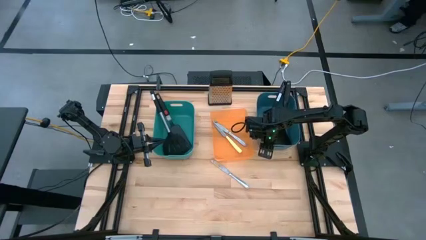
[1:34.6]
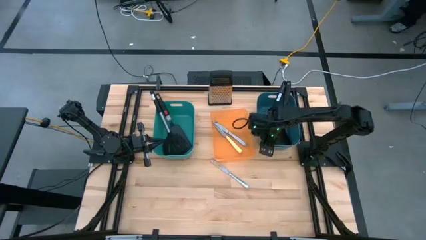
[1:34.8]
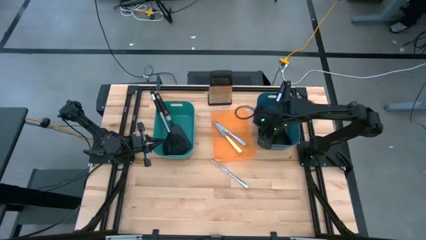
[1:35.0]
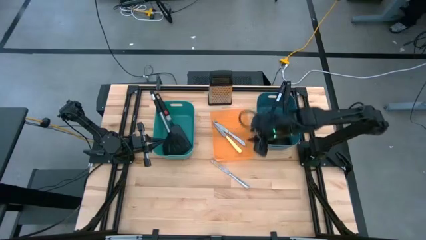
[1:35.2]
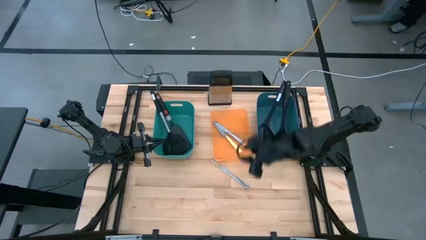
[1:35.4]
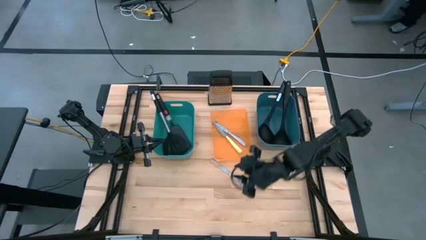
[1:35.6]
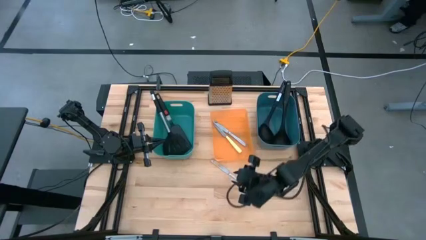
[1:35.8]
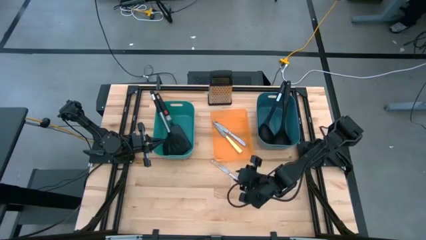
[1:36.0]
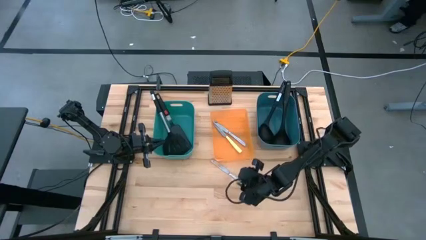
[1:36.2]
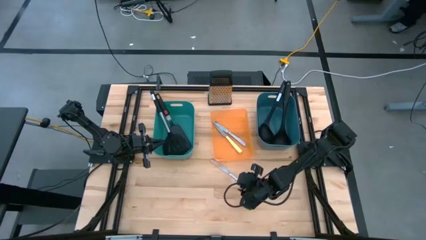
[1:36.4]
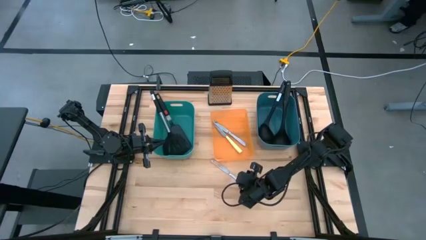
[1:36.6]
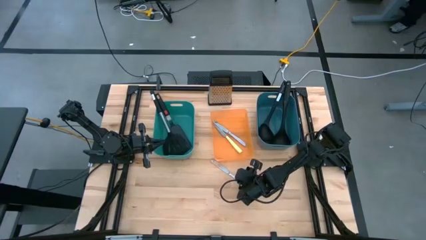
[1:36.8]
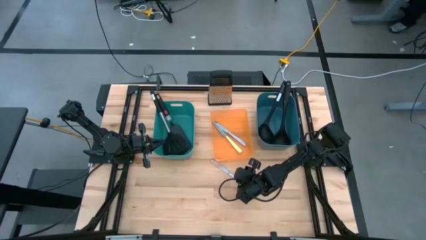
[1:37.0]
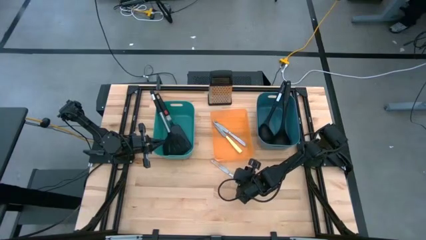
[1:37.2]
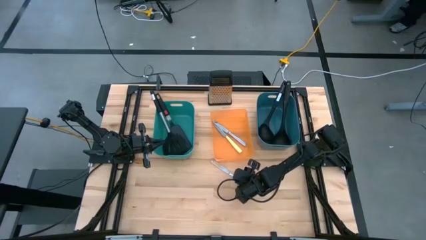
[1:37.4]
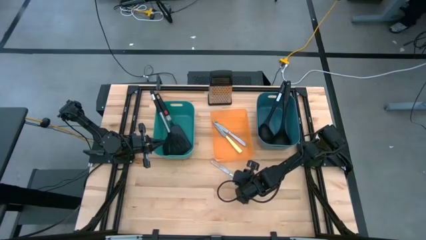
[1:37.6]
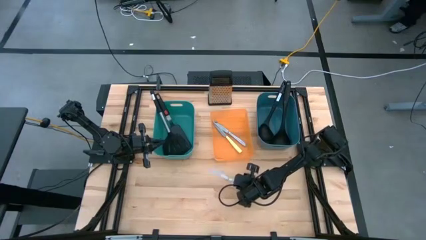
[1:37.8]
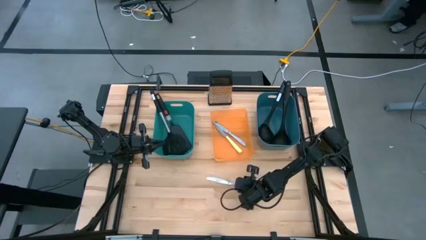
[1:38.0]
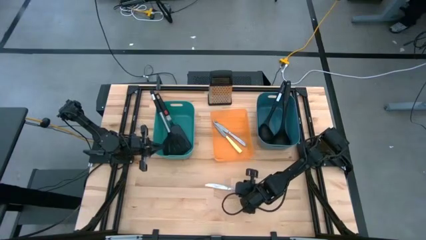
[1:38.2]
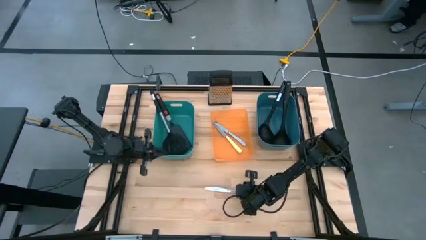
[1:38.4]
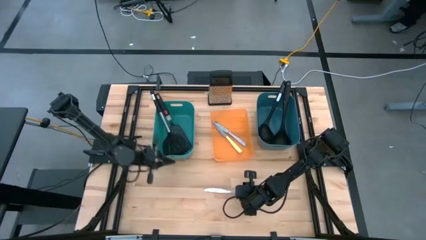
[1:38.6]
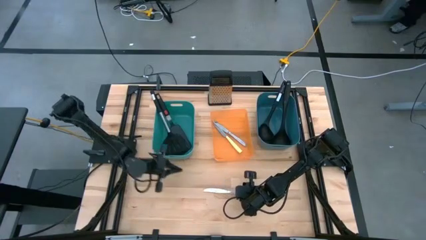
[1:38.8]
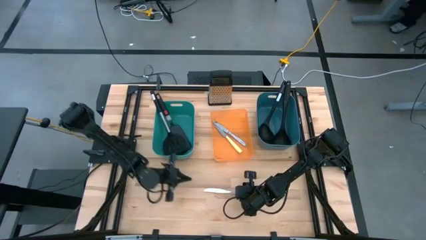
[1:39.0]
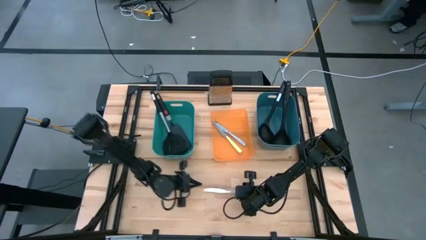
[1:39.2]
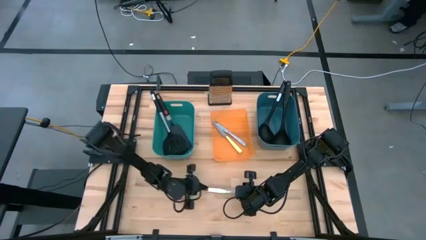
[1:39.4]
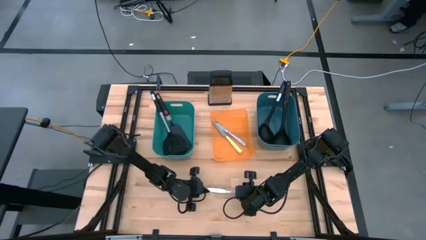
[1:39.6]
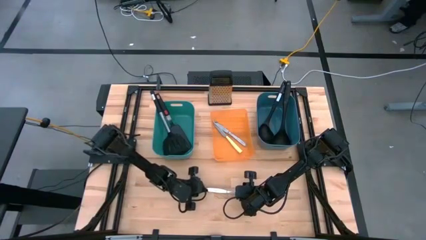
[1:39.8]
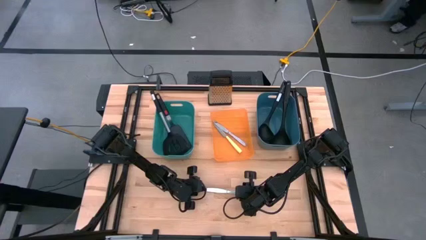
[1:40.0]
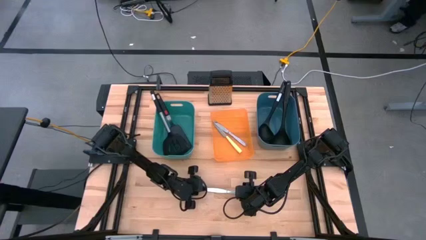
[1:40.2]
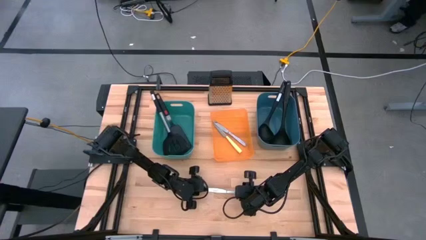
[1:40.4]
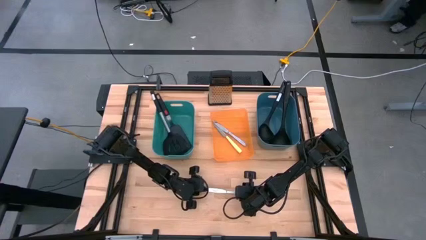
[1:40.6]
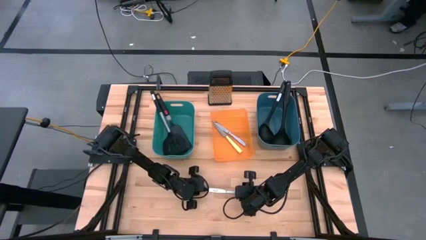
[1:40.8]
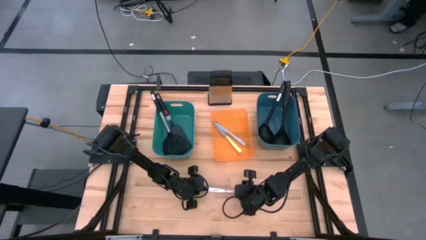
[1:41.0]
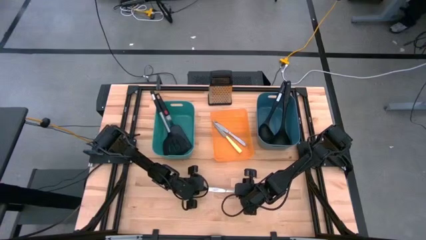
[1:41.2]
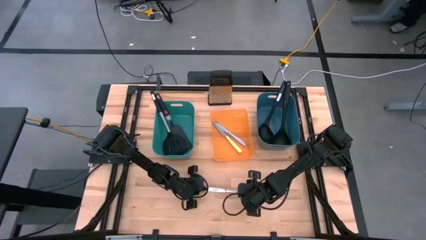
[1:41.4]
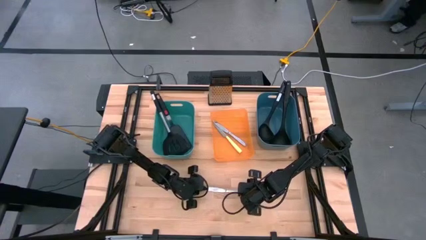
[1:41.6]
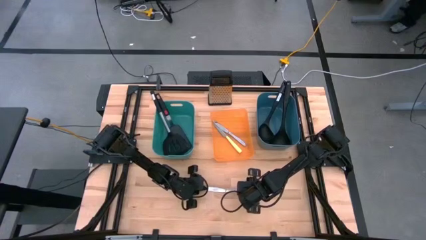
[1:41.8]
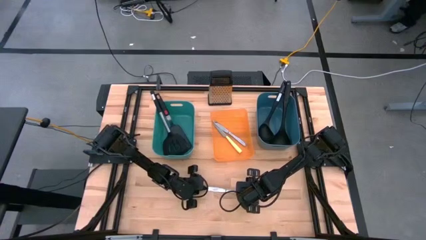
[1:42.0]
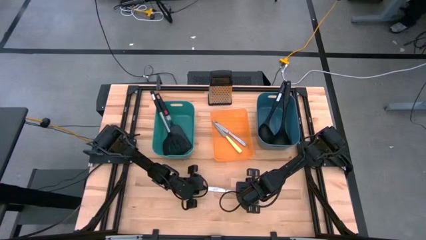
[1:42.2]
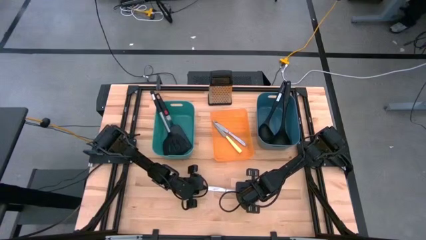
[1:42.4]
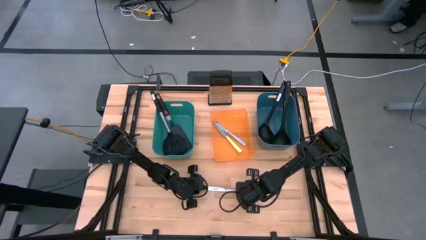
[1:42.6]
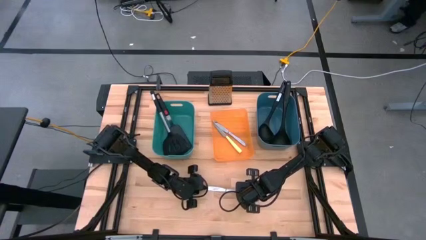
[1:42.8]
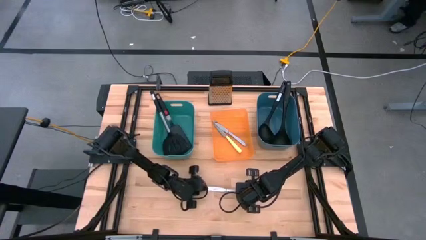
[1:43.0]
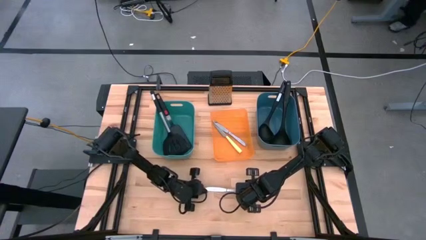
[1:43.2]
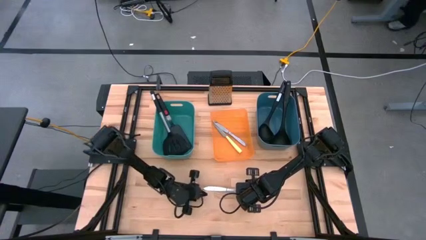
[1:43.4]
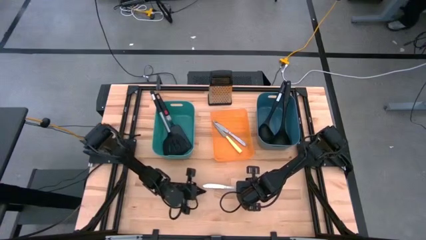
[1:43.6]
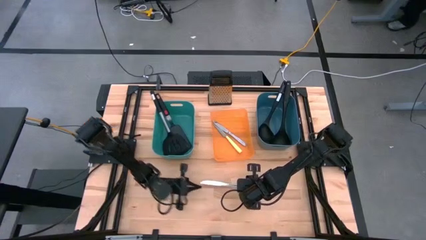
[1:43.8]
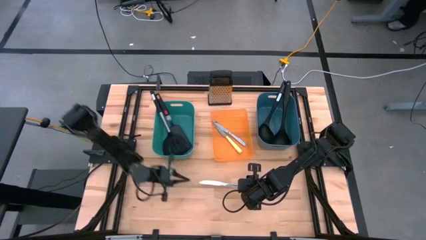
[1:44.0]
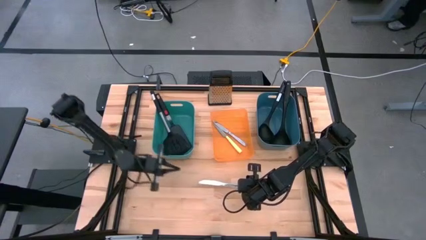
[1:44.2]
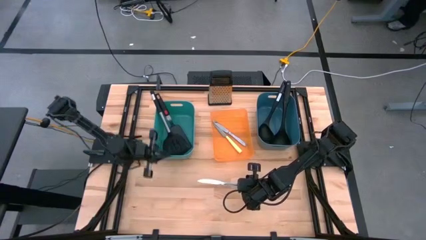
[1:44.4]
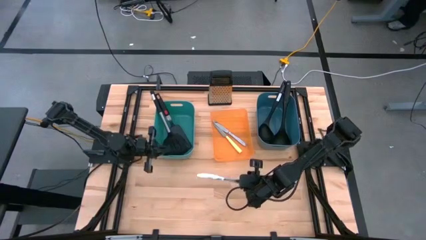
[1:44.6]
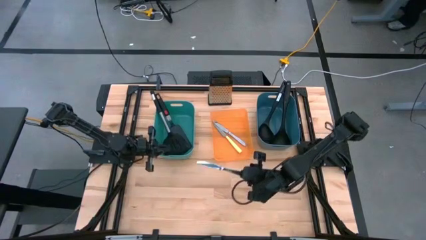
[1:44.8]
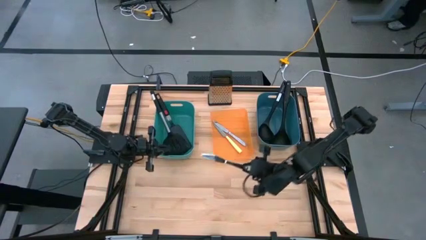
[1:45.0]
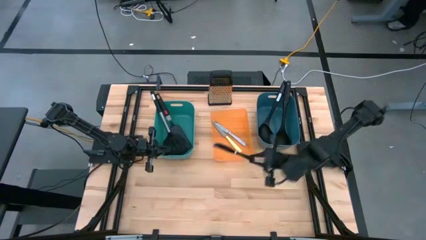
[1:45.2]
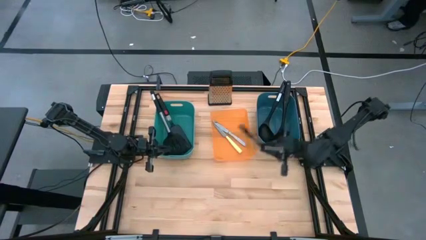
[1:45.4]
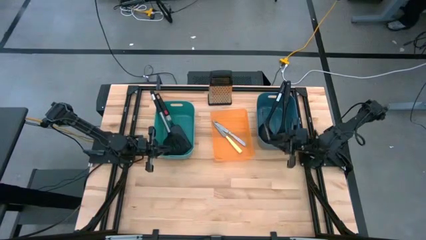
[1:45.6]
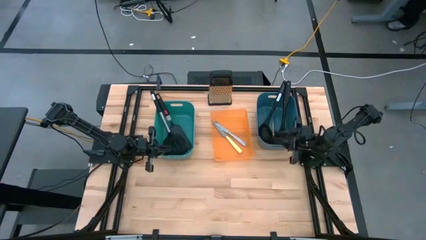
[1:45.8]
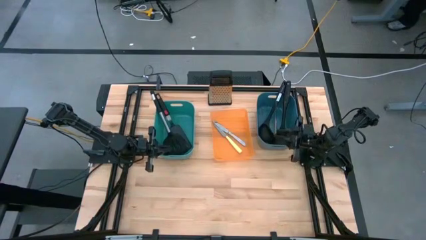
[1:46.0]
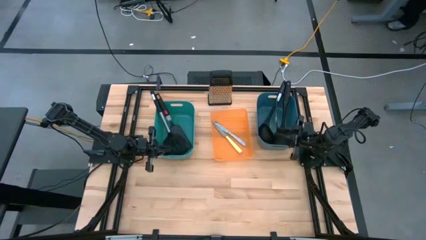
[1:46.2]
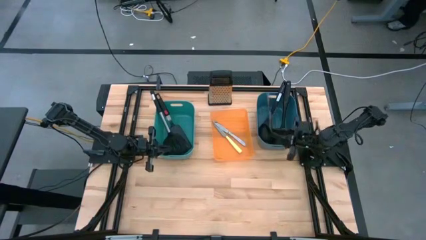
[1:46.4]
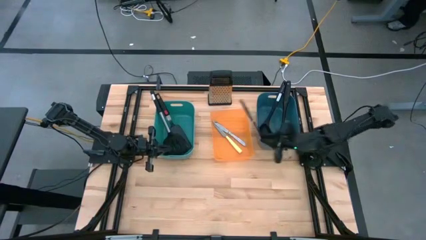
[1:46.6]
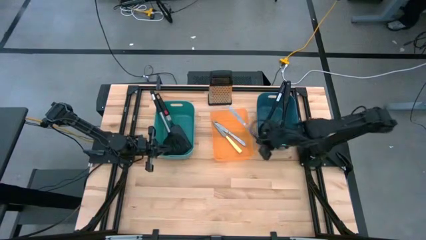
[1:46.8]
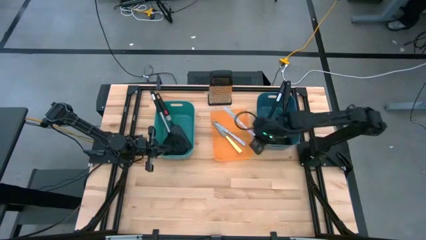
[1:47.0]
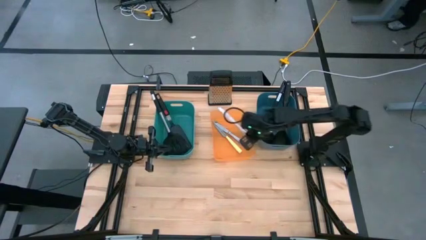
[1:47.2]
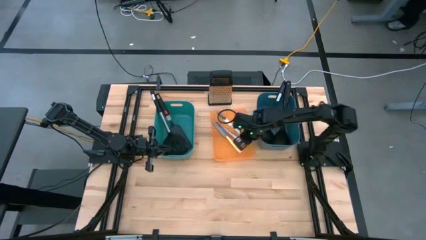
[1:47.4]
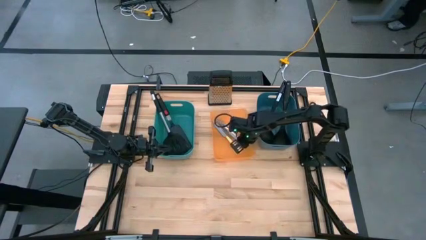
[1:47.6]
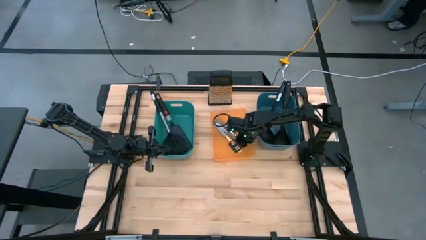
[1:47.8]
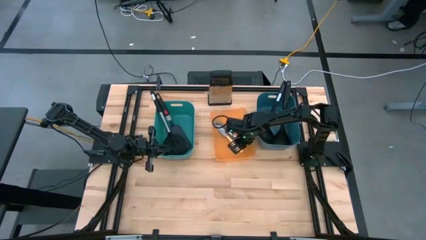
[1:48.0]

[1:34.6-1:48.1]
Task: Pick & Place Kitchen Items
Put the silver knife into the orange bin

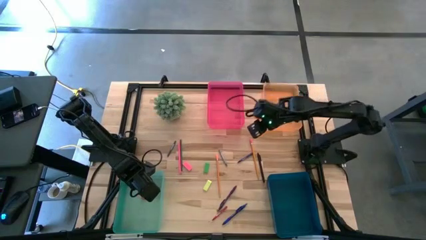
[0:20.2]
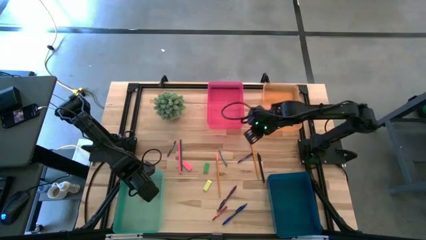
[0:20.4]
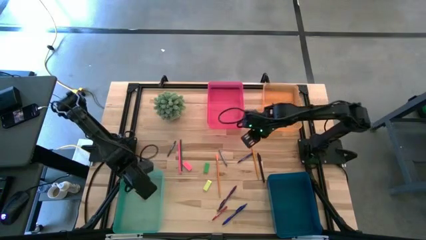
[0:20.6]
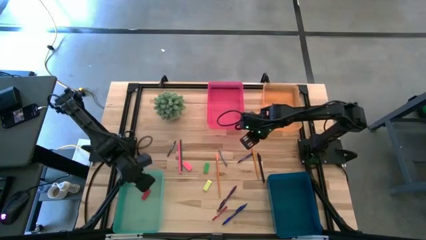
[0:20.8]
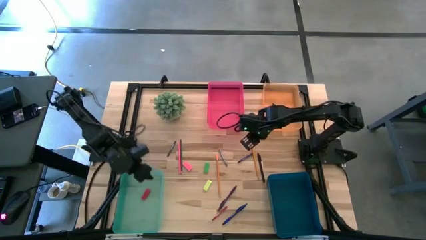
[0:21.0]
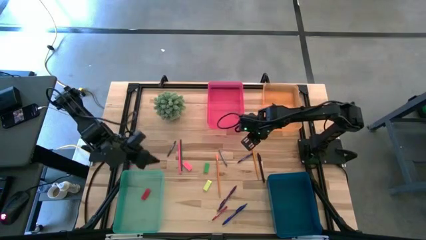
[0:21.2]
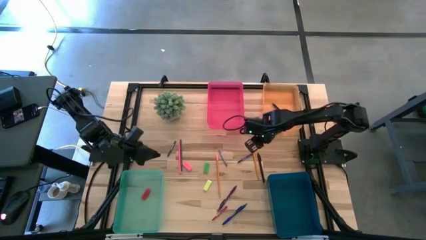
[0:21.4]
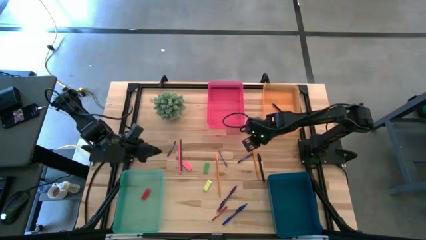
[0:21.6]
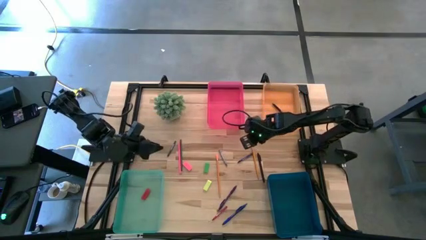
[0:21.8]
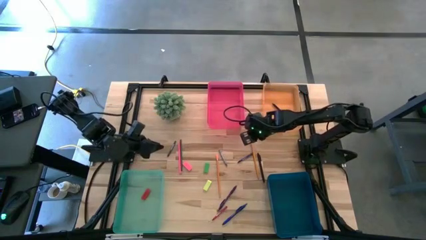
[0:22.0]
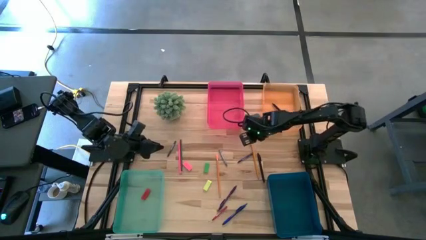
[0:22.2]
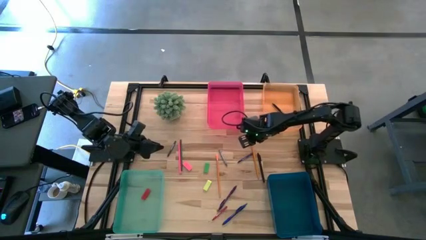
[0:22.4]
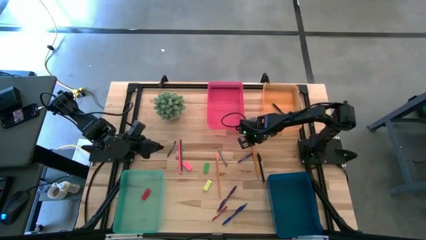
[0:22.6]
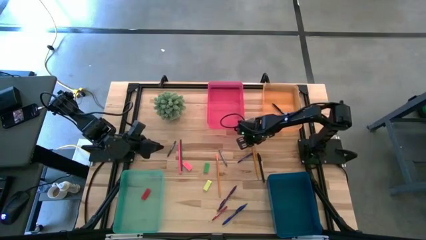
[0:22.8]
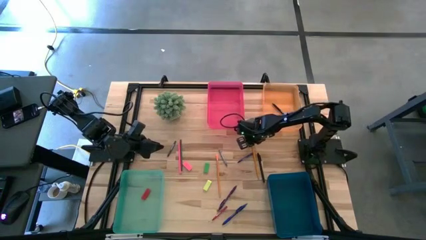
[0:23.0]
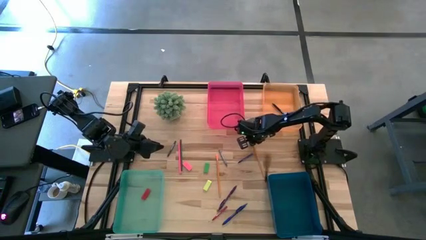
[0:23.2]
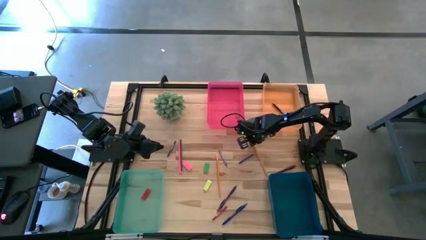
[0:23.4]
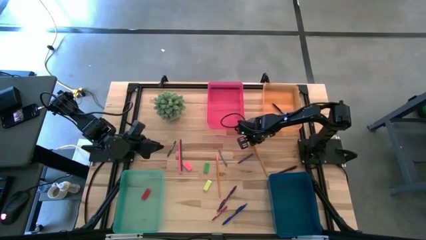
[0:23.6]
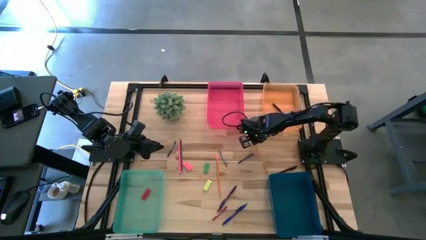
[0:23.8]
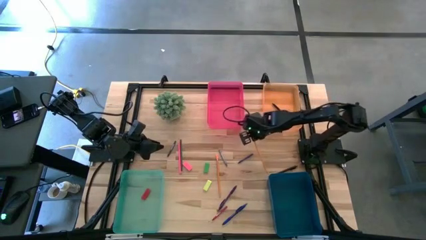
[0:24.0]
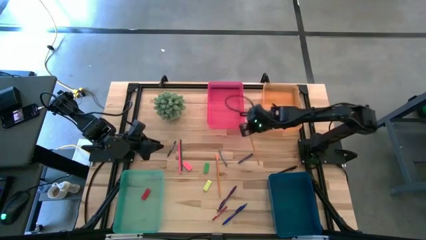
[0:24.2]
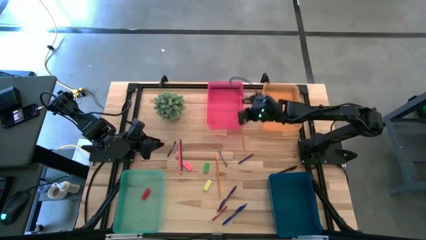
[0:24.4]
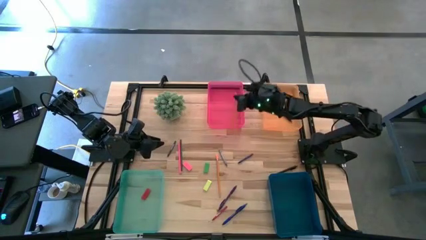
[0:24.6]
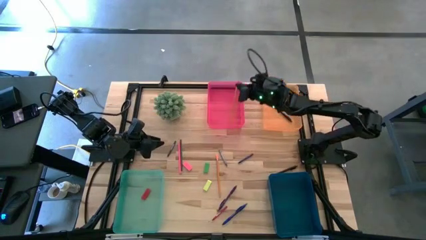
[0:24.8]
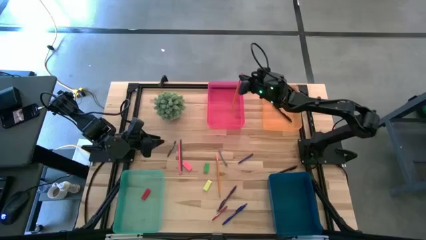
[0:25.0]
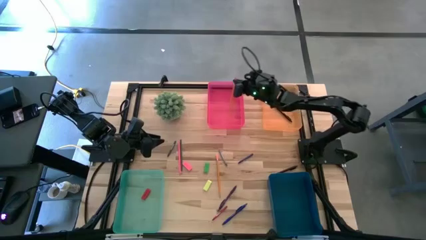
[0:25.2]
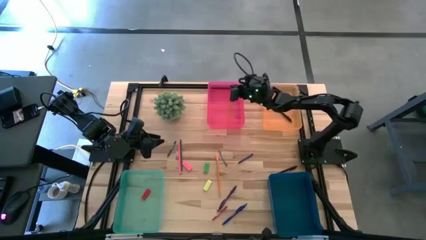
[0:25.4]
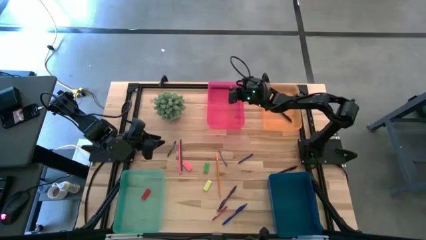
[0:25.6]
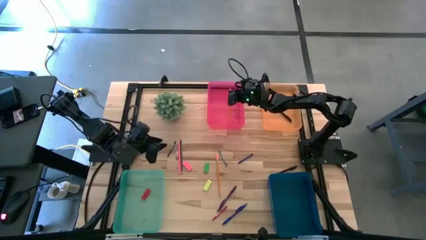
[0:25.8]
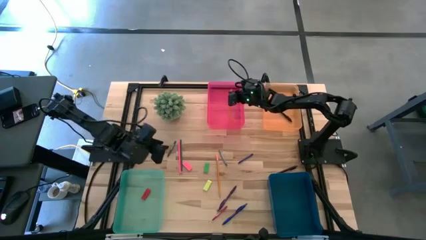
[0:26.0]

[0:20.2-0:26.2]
Task: Sort crayons/erasers/pens/pencils in bins
Put the right yellow pencil into the pink bin
